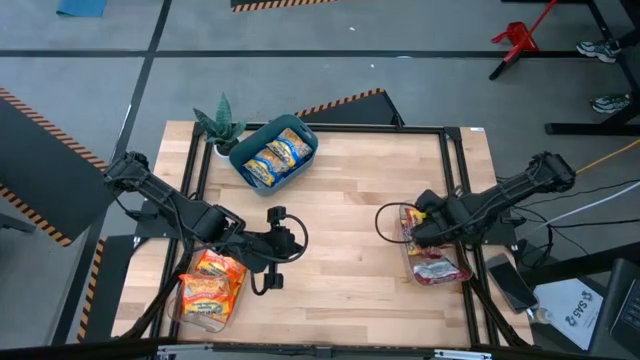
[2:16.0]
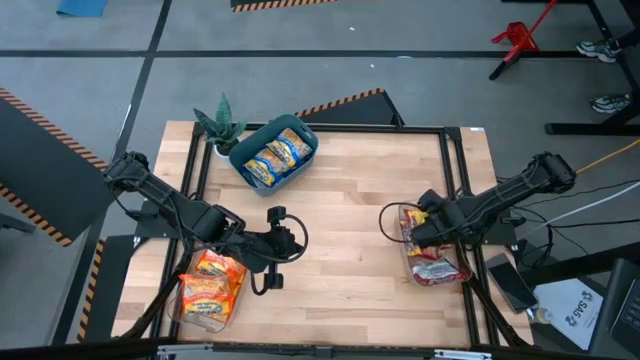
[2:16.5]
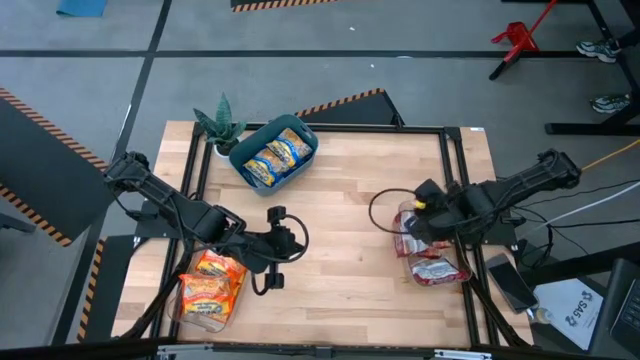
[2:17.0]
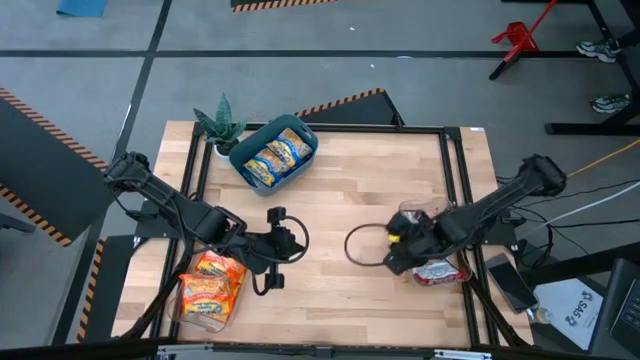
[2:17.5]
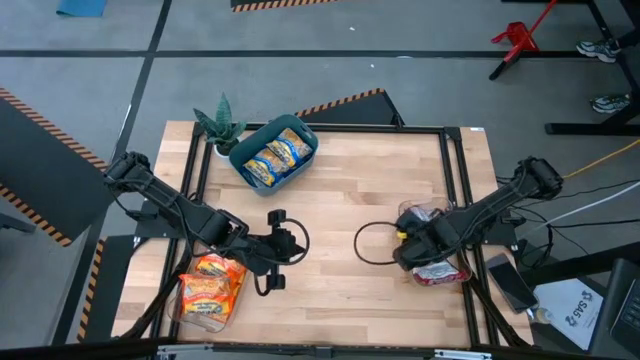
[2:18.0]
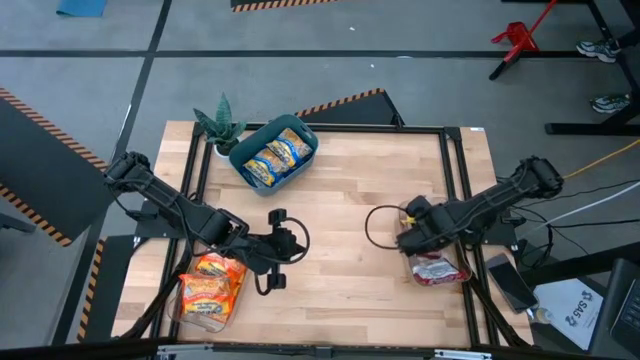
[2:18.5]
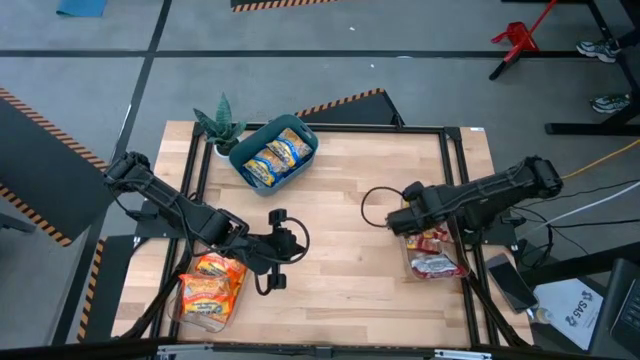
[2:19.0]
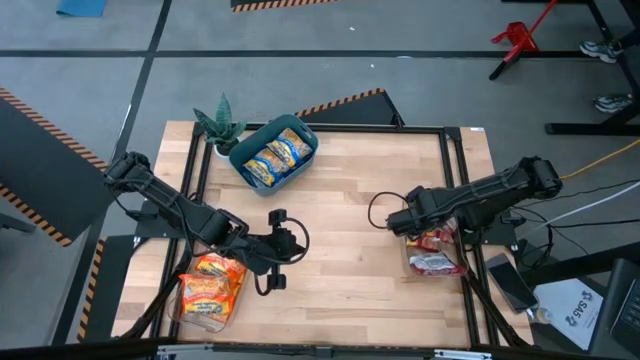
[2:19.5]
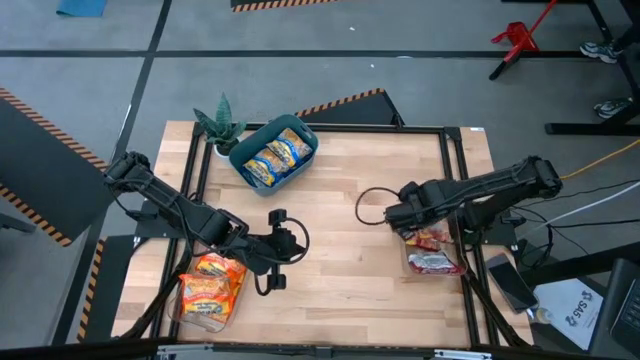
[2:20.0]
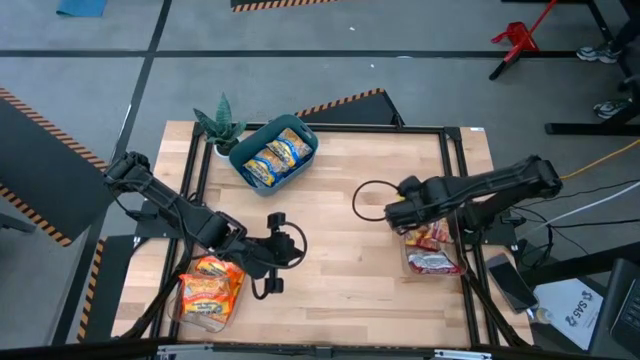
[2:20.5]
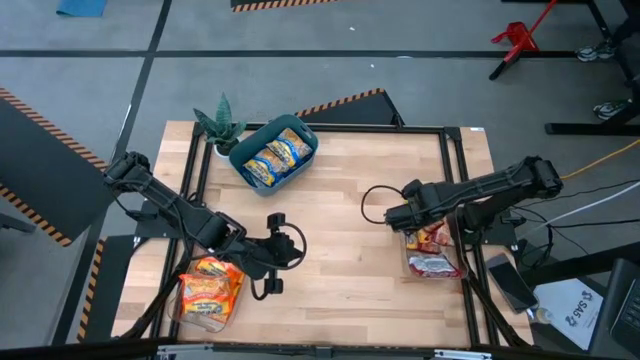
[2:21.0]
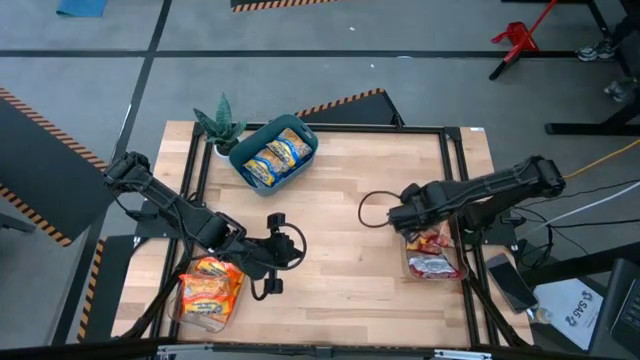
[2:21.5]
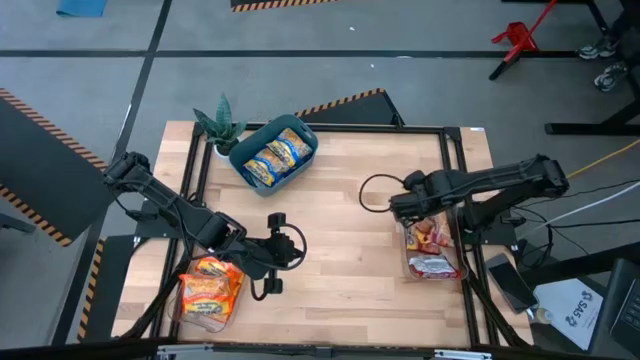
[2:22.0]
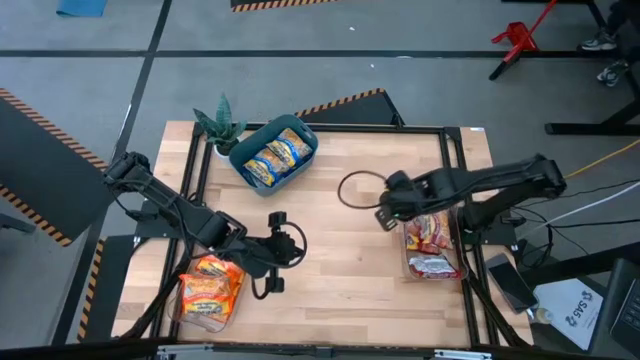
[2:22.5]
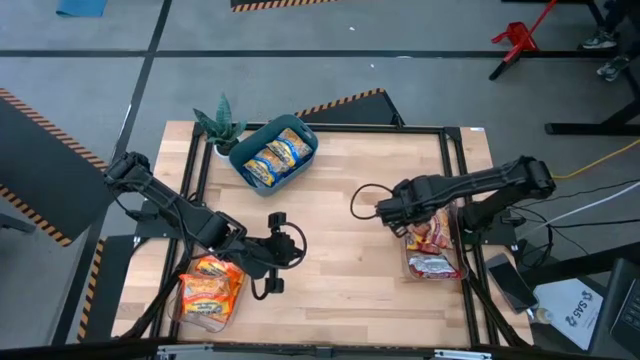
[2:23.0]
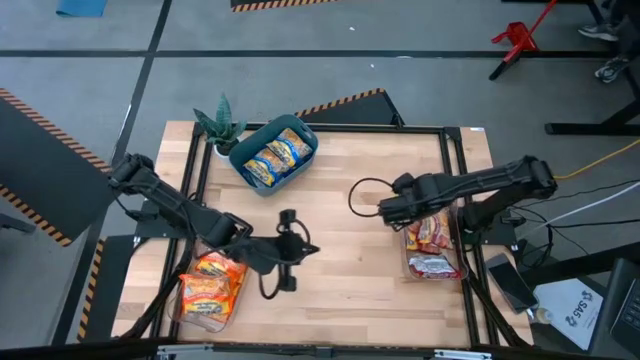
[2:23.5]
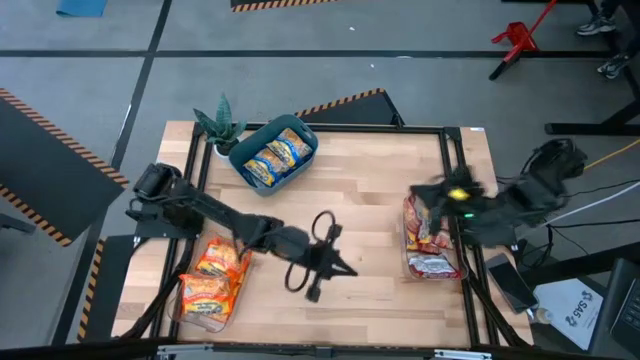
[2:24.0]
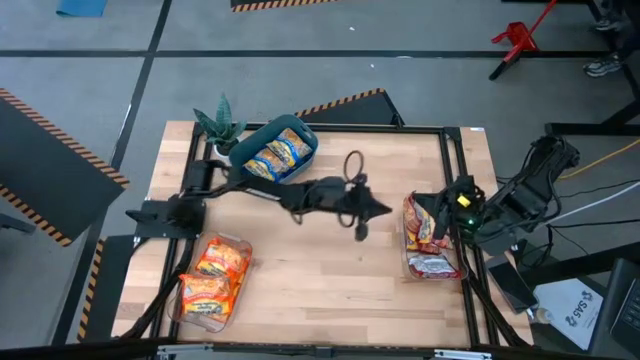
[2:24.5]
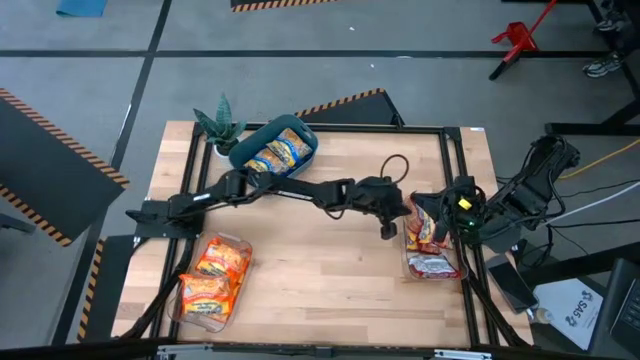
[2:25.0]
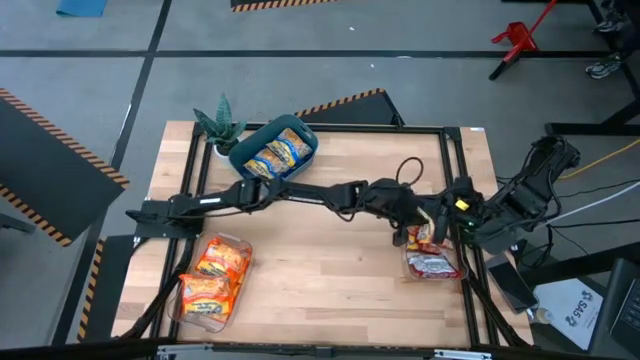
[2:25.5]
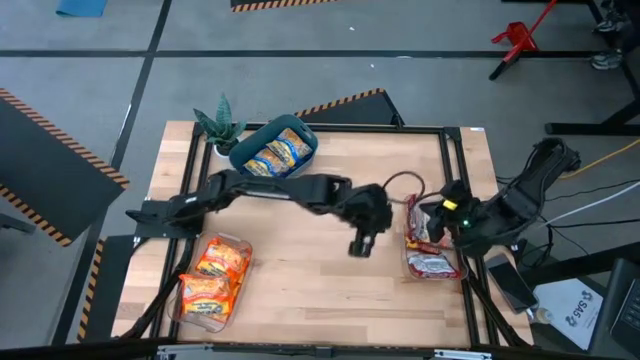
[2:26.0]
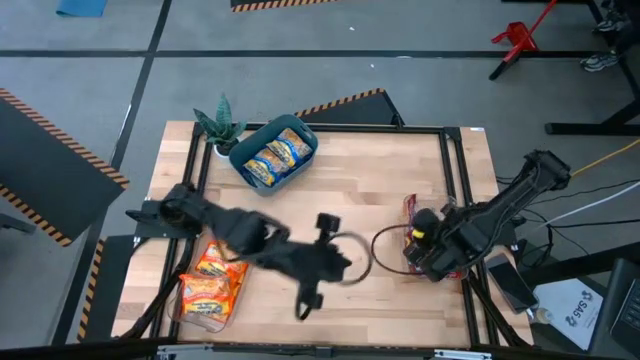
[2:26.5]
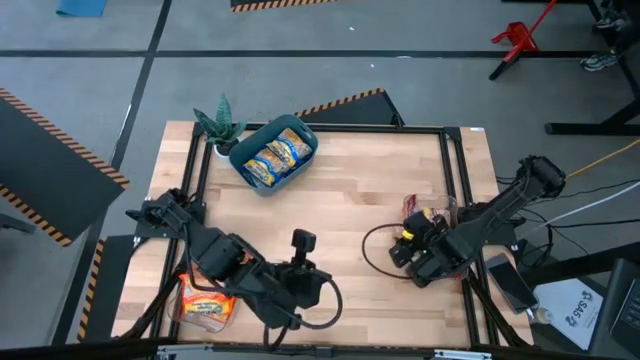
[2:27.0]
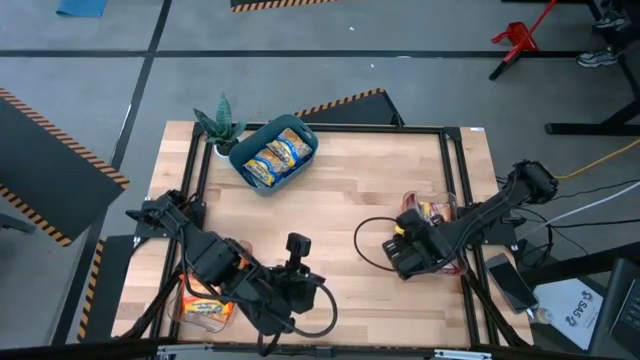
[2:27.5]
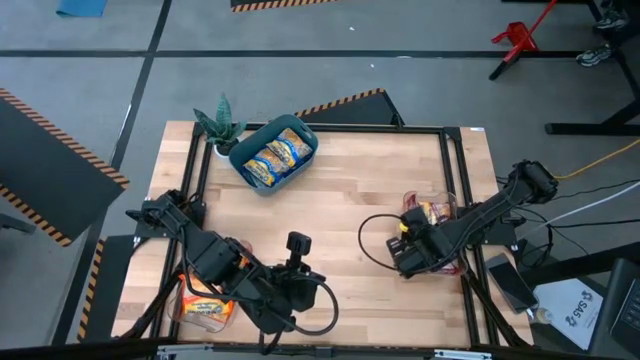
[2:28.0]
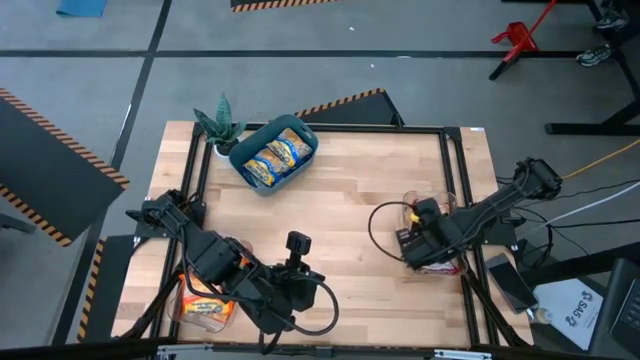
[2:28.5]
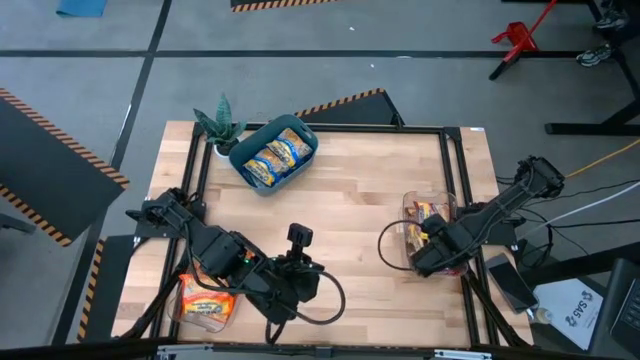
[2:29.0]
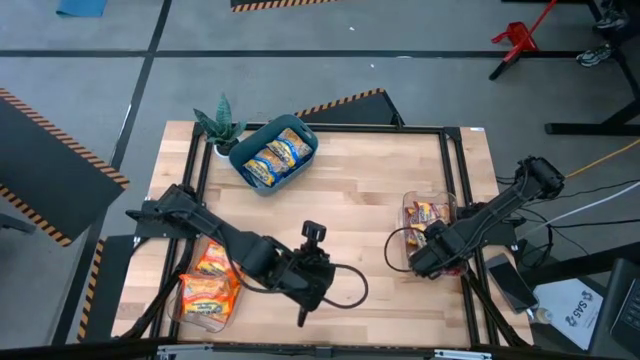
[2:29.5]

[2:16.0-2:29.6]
Task: Sort Maruchan noodles
Adjust the red noodle pack

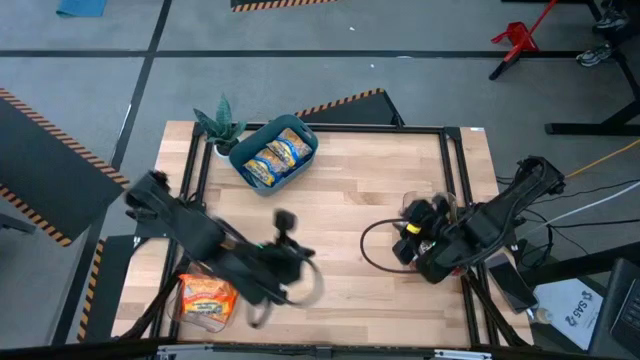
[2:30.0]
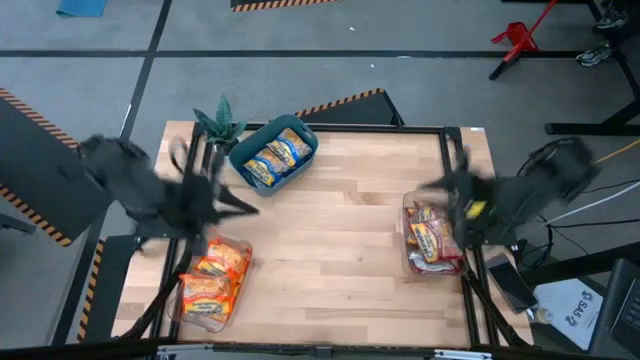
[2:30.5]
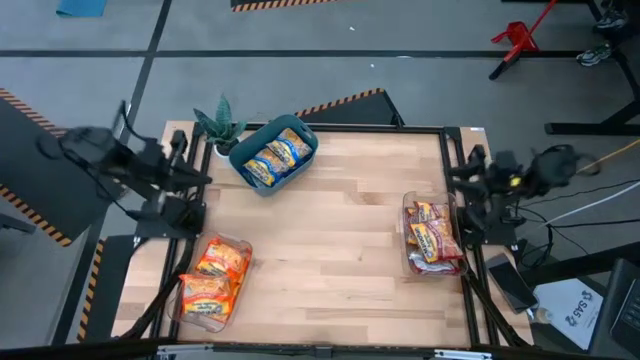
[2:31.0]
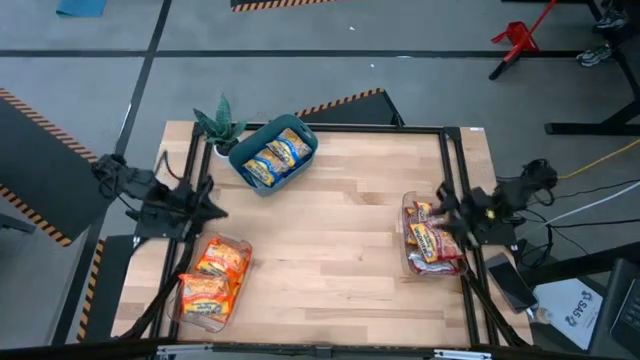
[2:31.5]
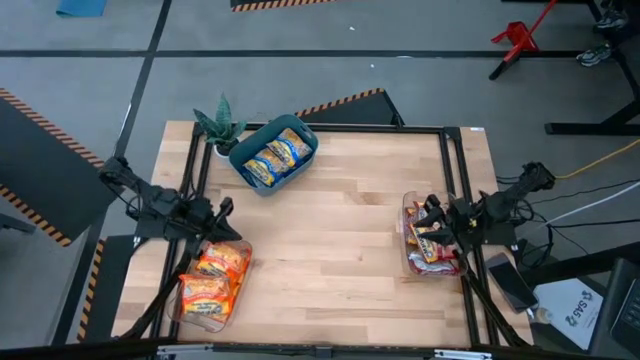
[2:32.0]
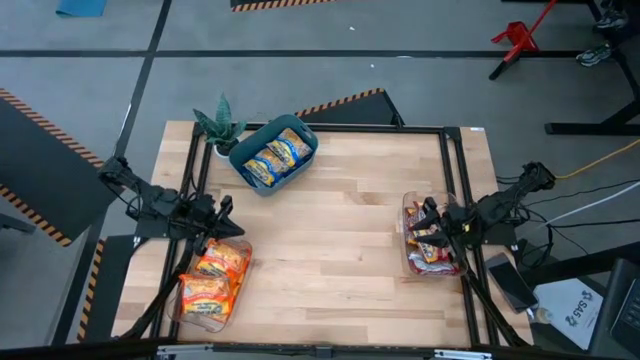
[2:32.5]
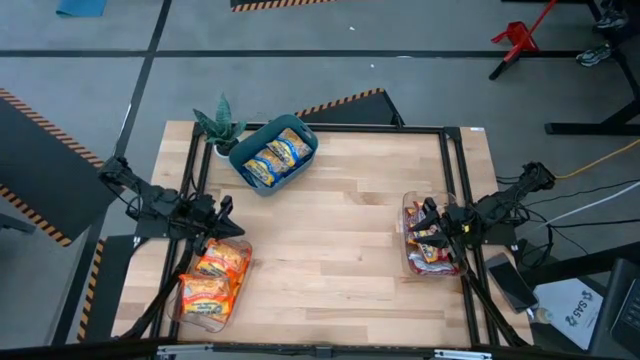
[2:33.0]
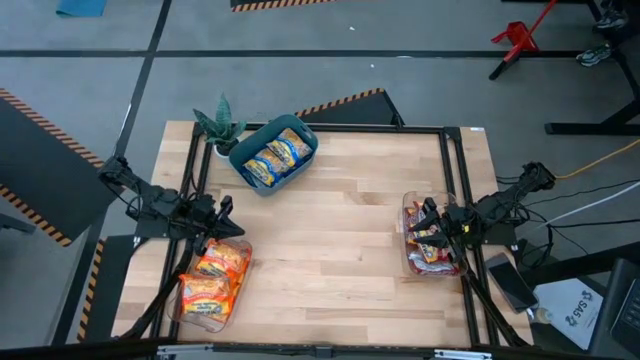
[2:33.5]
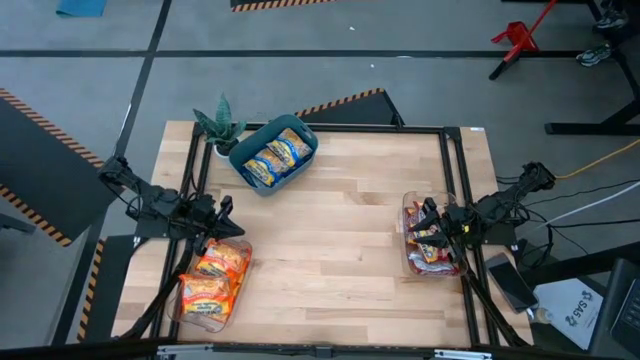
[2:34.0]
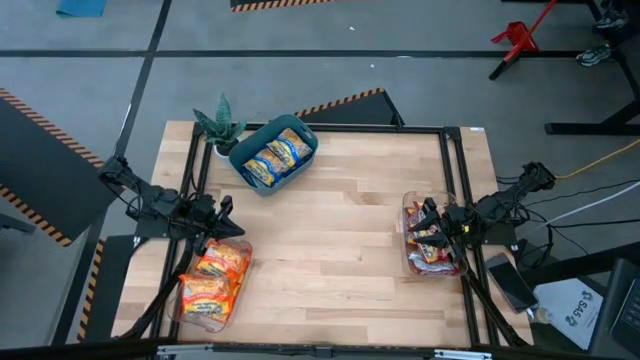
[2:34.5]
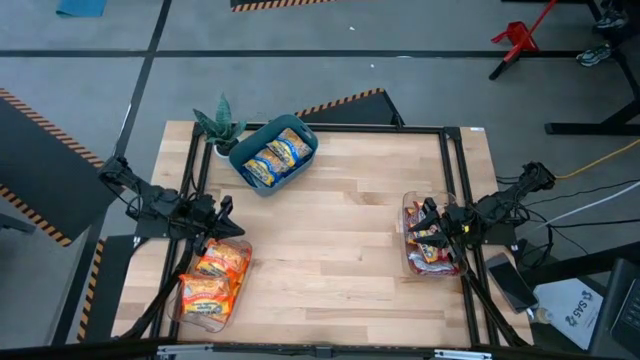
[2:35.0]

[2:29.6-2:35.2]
Return to Home Position
